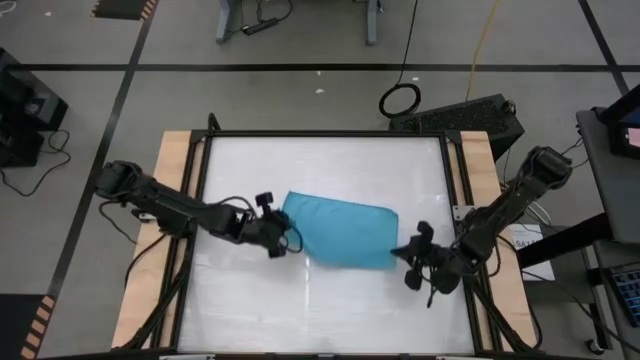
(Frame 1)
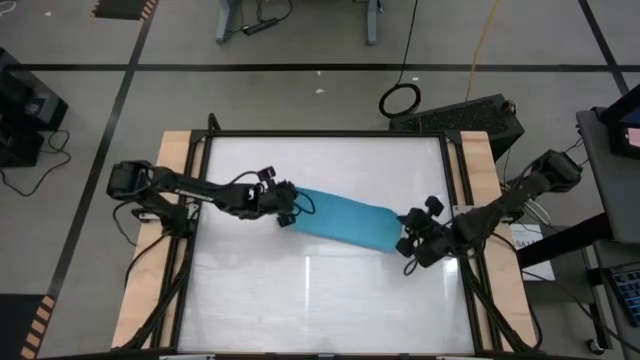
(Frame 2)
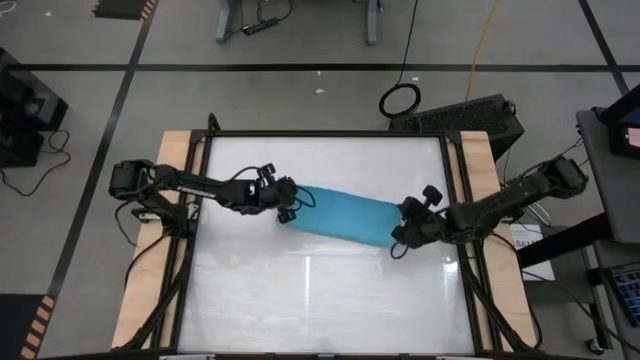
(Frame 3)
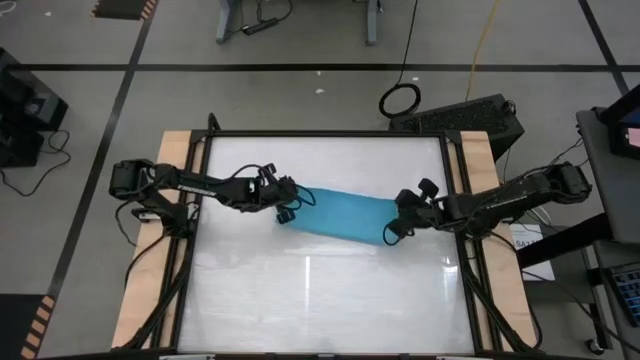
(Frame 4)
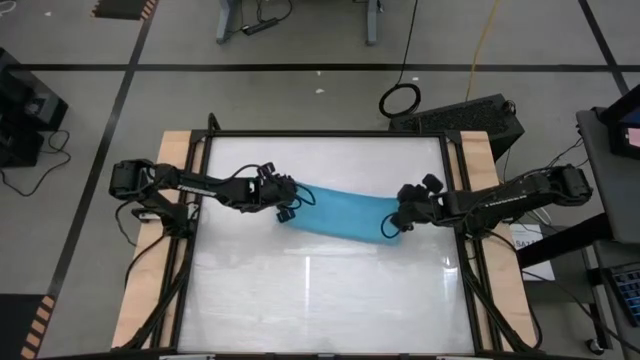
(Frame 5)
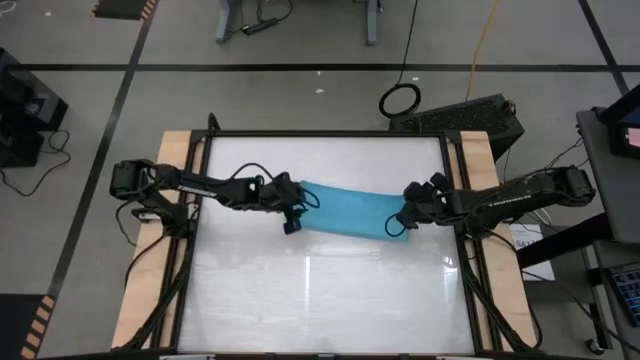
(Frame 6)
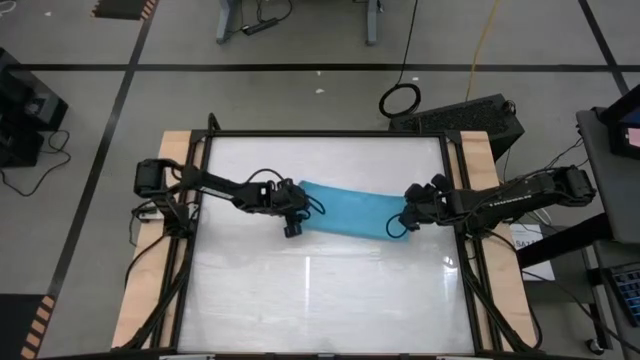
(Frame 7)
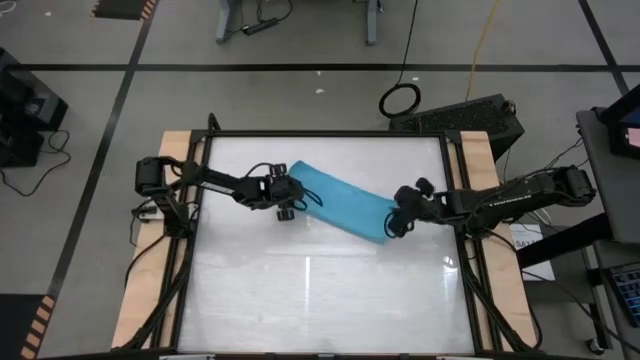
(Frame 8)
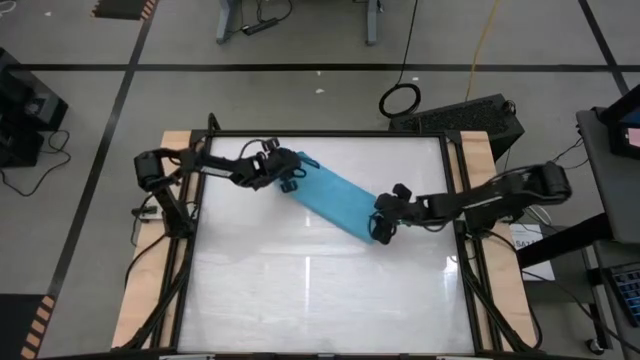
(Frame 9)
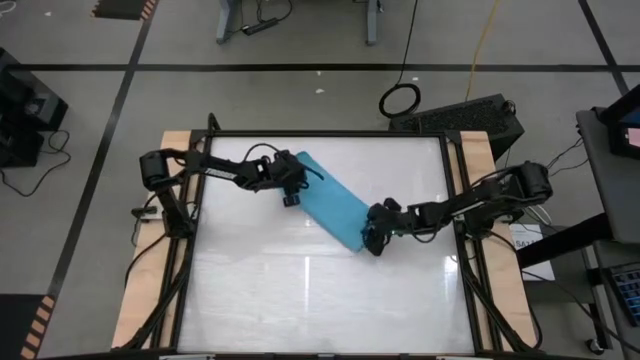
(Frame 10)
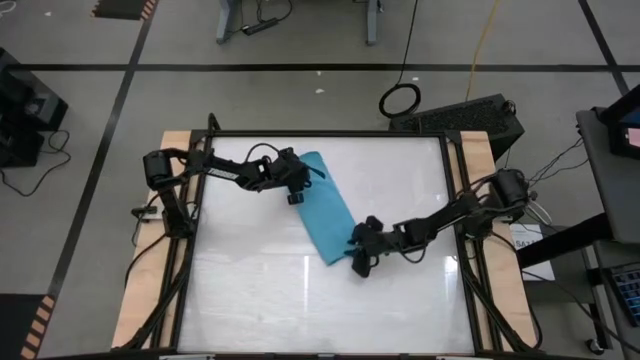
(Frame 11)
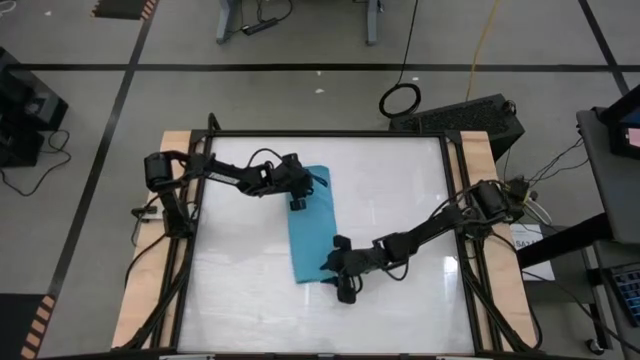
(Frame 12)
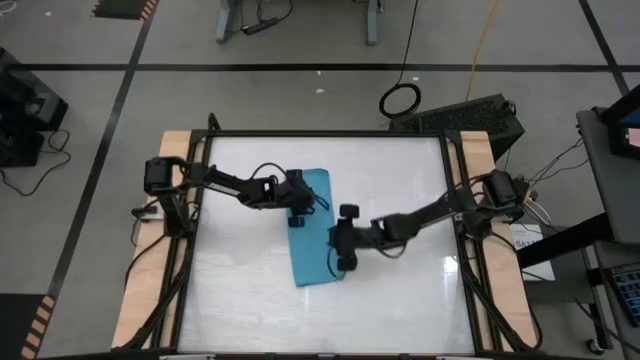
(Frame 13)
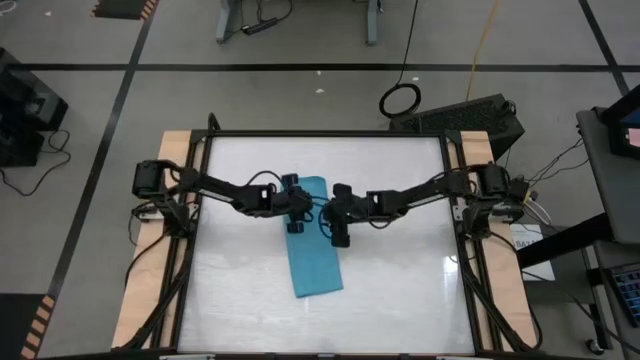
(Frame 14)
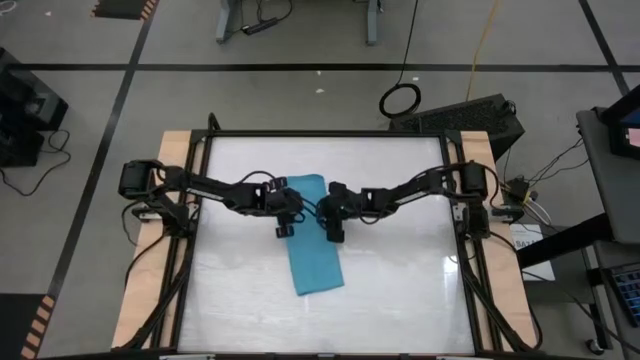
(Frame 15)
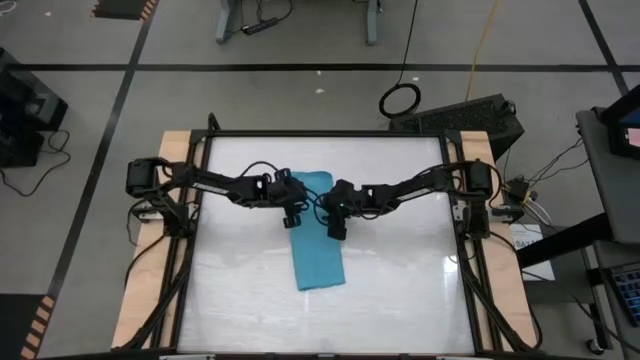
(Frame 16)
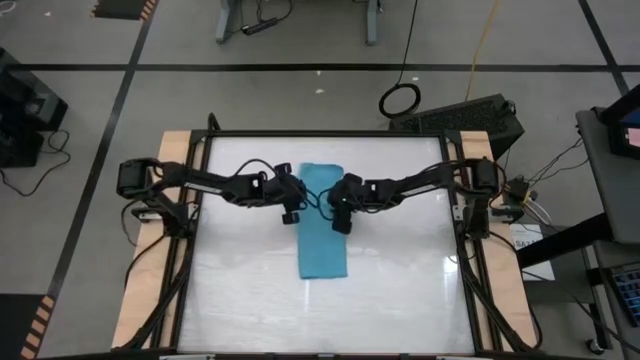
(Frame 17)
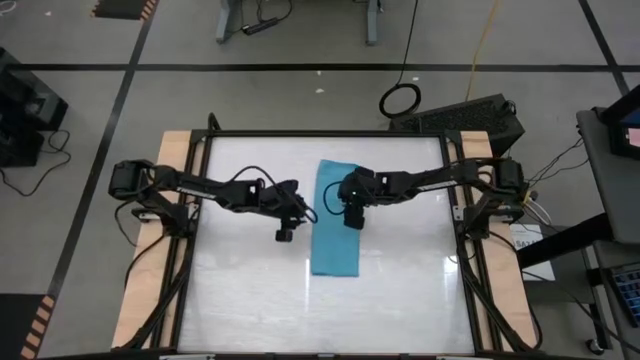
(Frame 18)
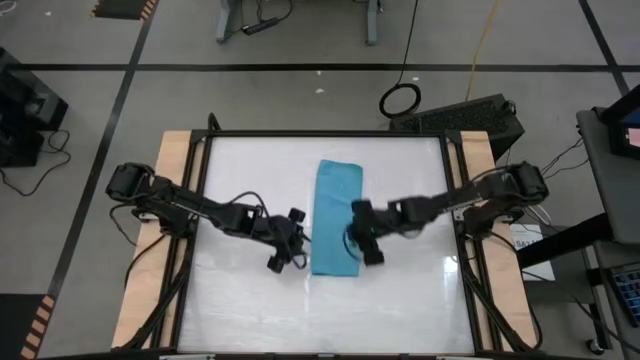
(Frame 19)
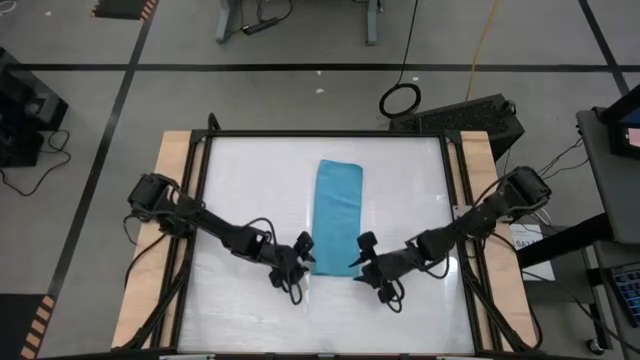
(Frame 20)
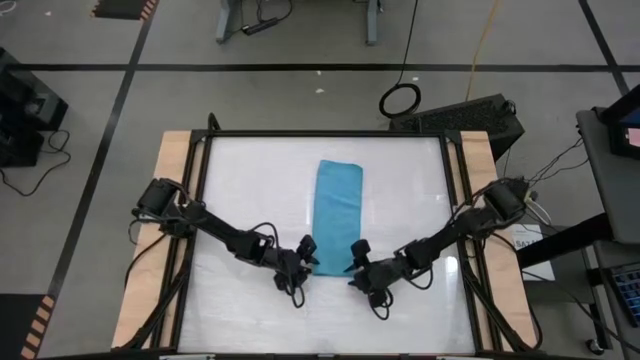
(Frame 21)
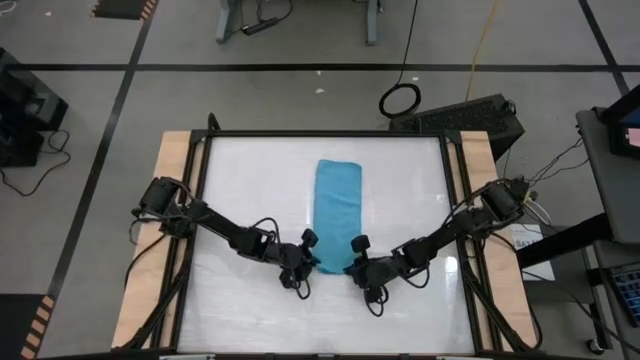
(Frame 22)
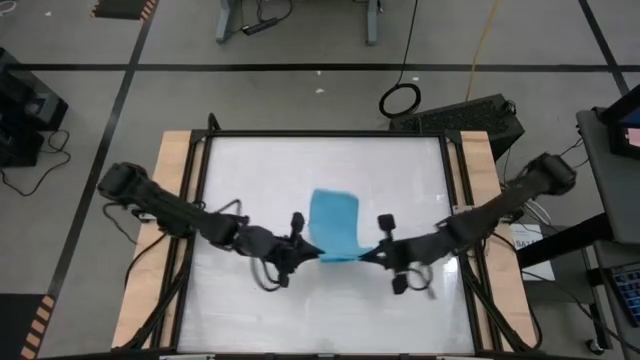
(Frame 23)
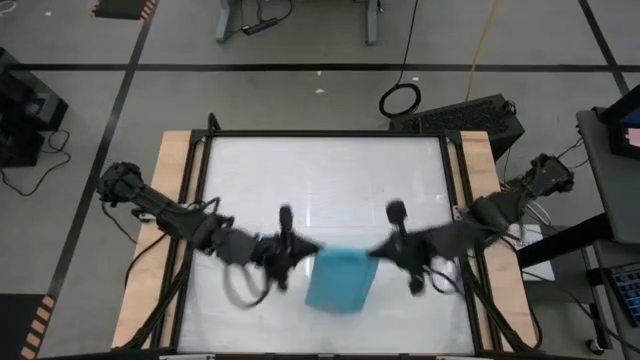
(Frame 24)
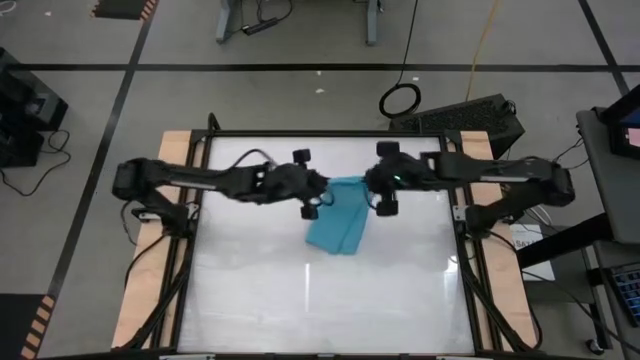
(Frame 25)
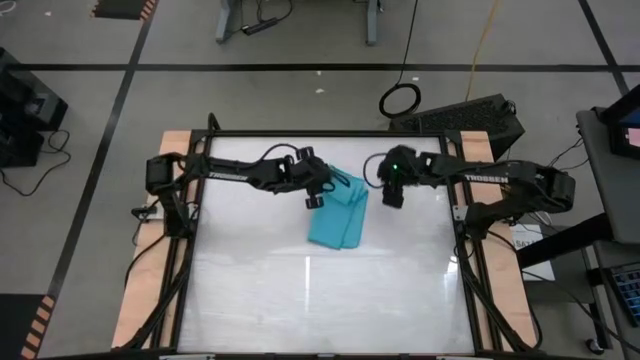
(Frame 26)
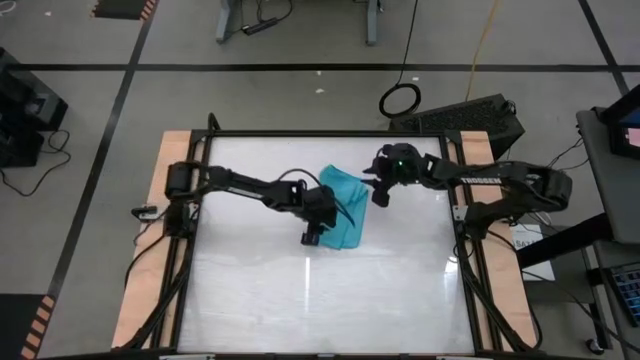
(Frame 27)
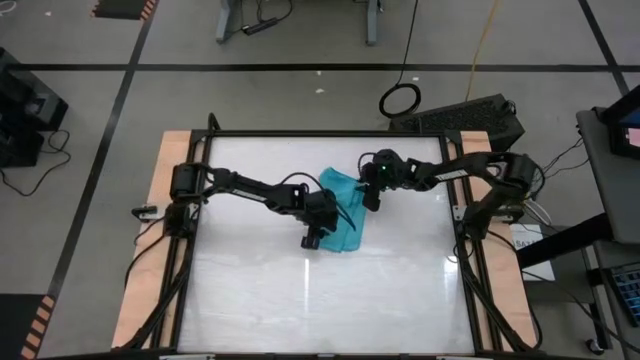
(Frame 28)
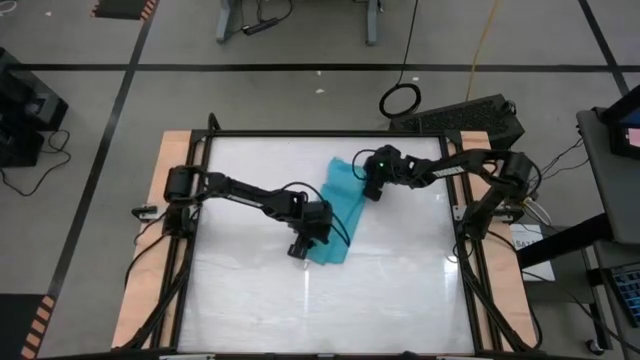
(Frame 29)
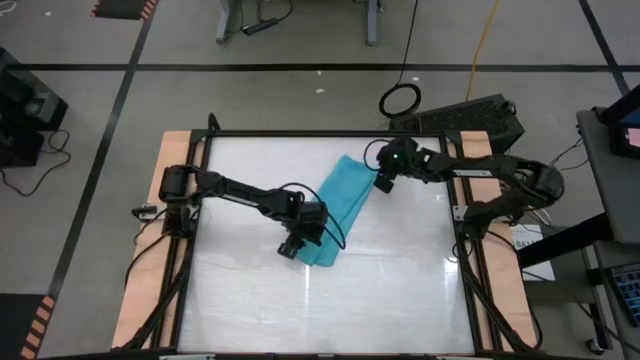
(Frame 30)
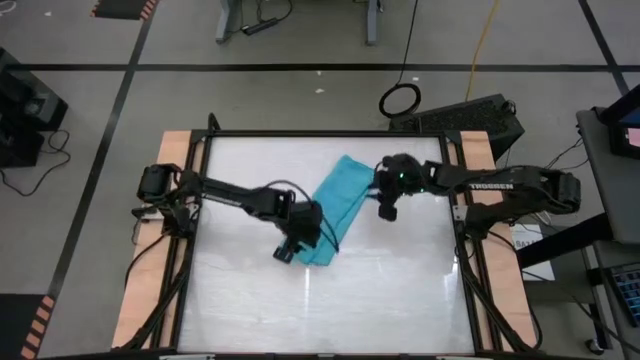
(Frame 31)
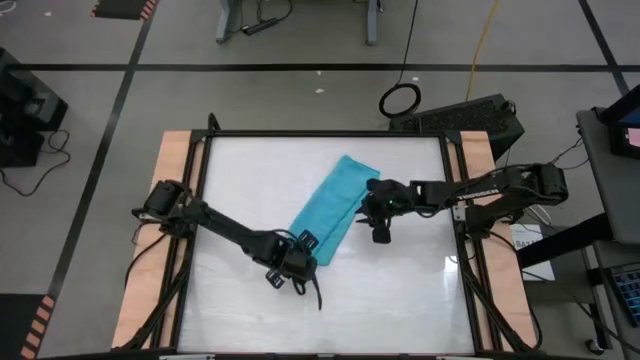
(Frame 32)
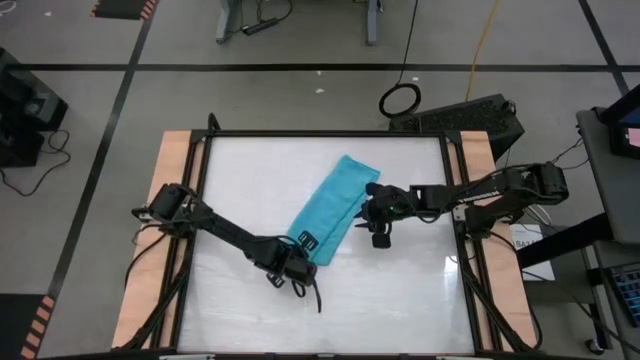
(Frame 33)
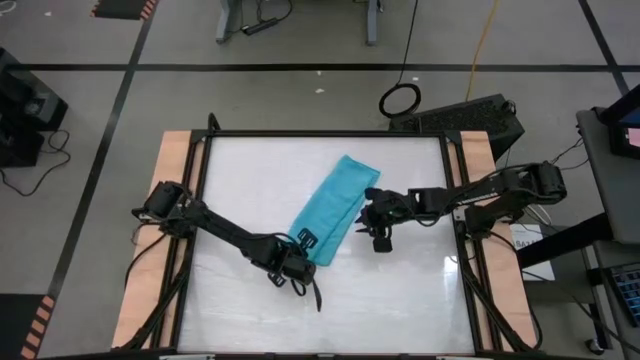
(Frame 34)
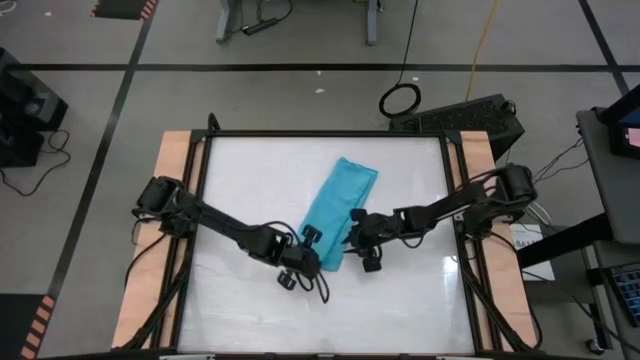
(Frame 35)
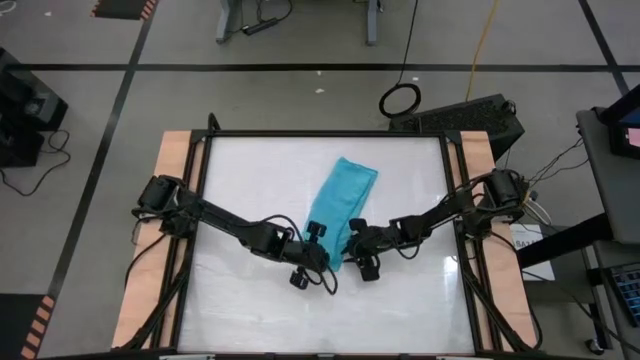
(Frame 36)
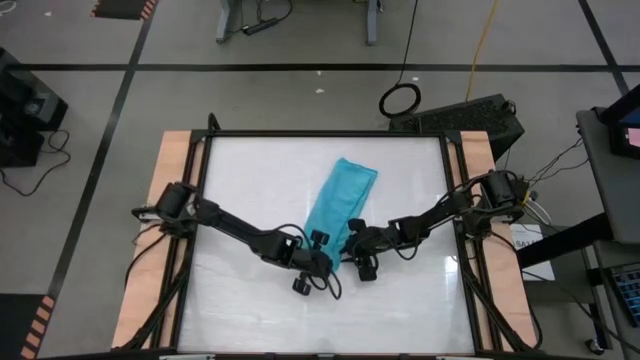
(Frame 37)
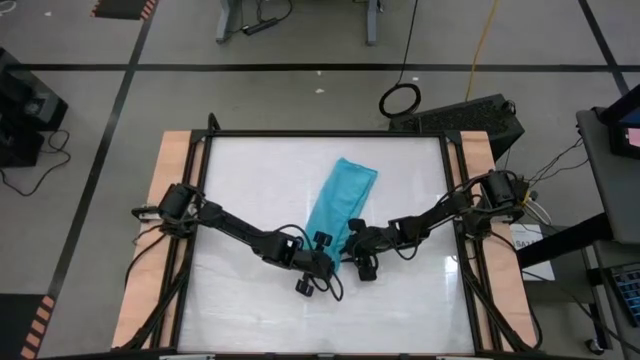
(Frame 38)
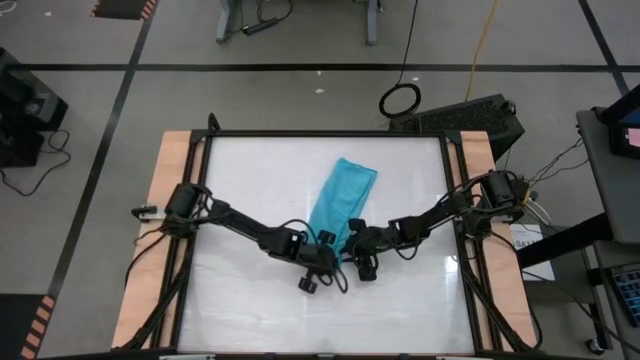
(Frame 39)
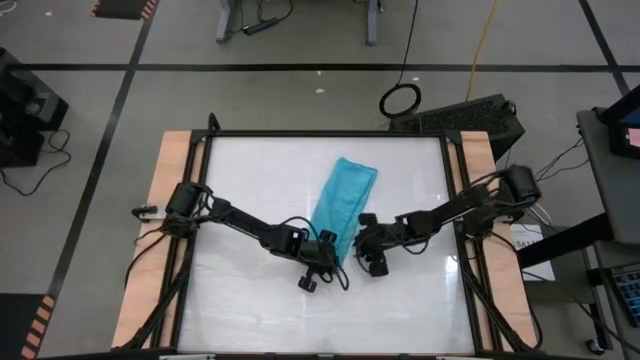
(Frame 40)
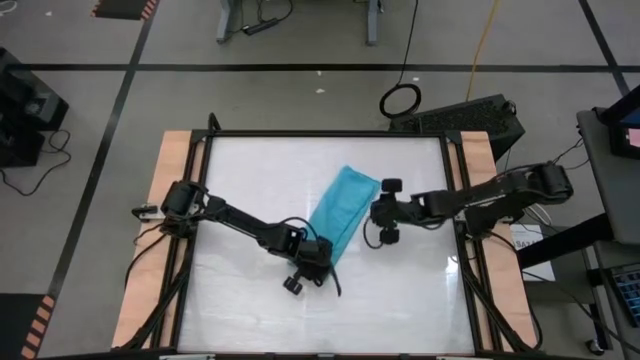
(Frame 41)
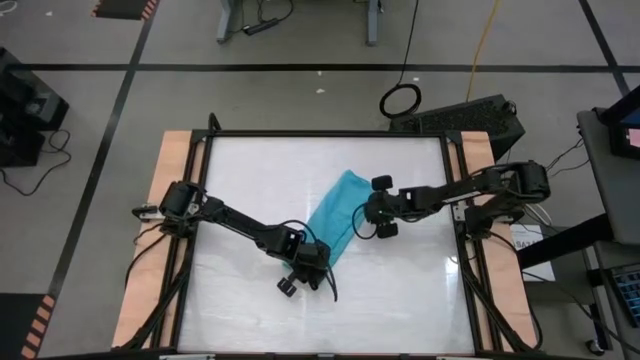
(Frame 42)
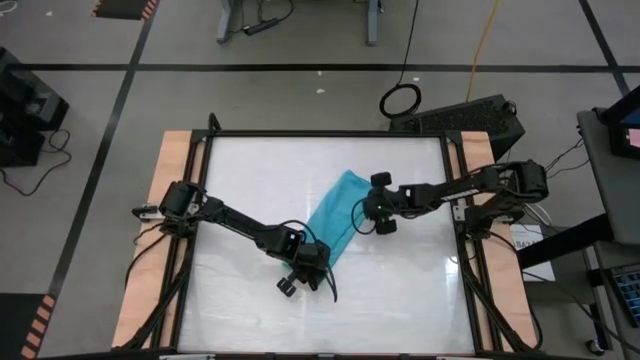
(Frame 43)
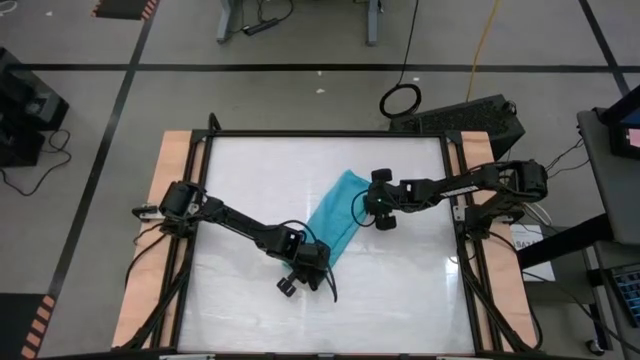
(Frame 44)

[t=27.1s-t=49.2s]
Task: Roll towel
Roll the blue towel
